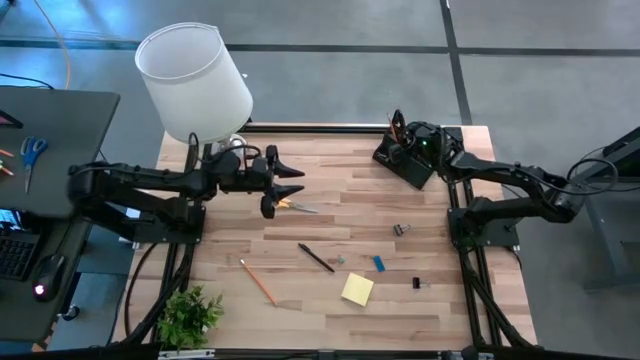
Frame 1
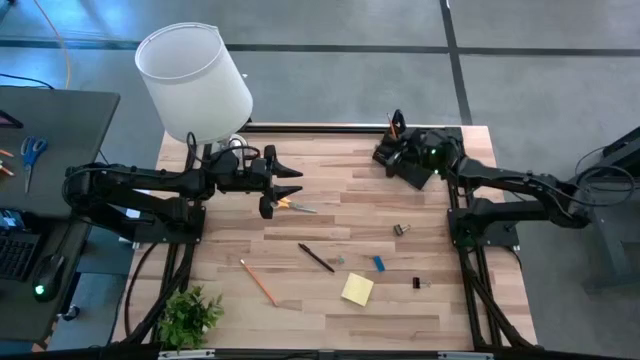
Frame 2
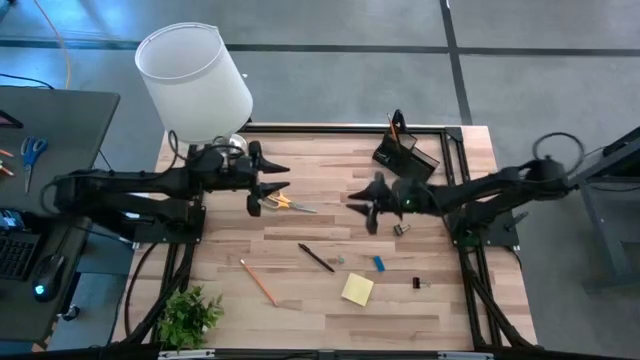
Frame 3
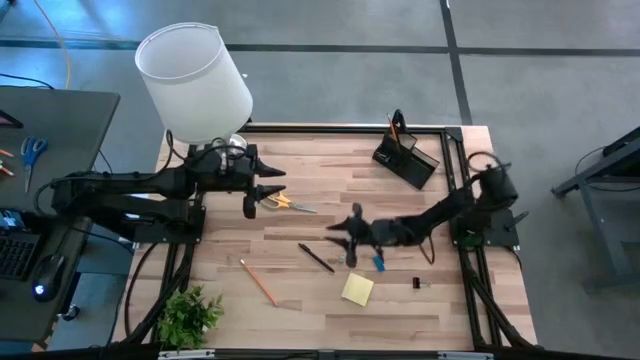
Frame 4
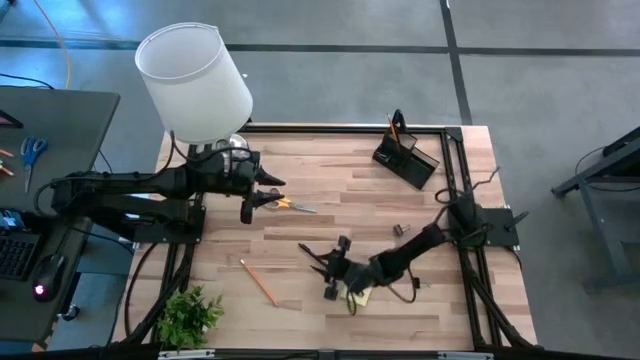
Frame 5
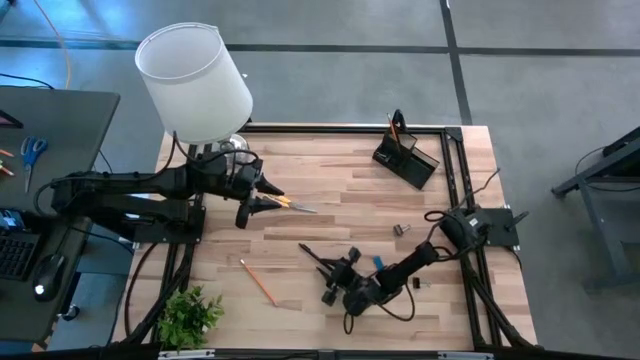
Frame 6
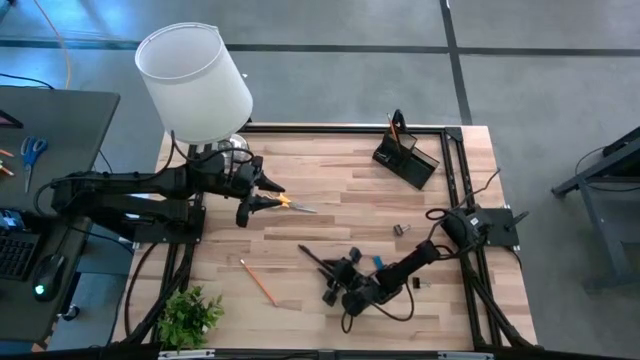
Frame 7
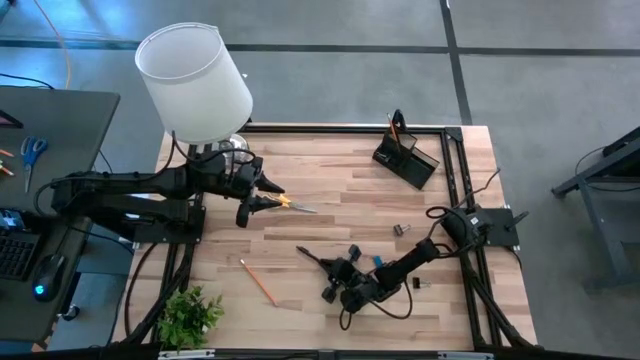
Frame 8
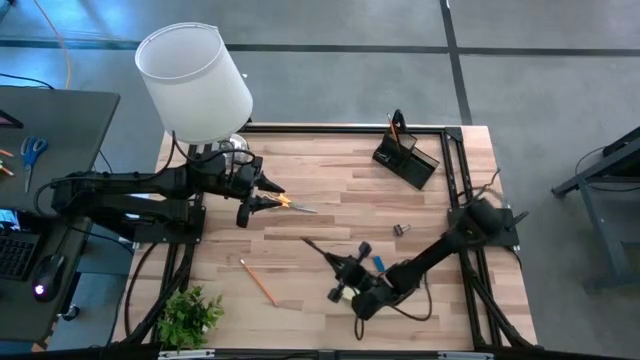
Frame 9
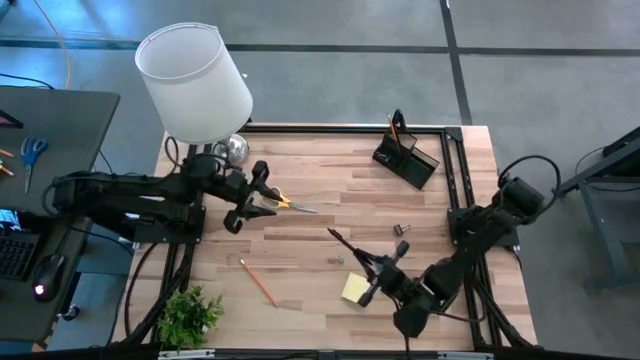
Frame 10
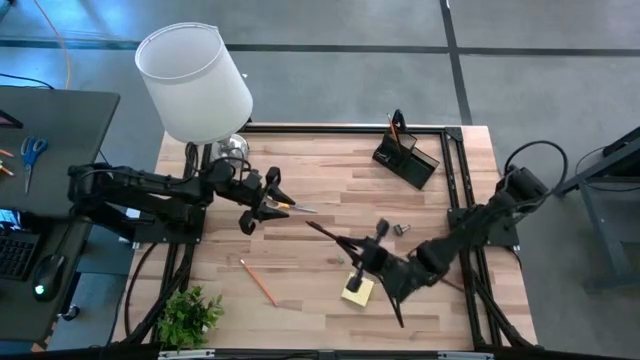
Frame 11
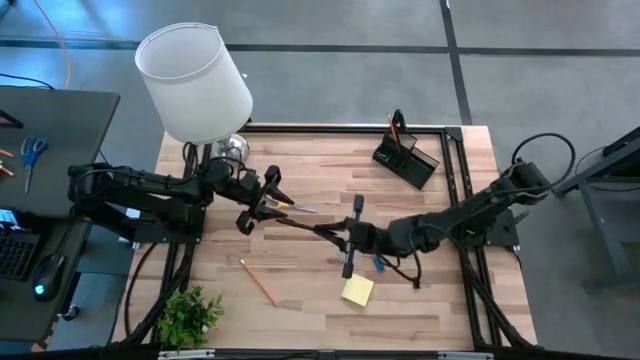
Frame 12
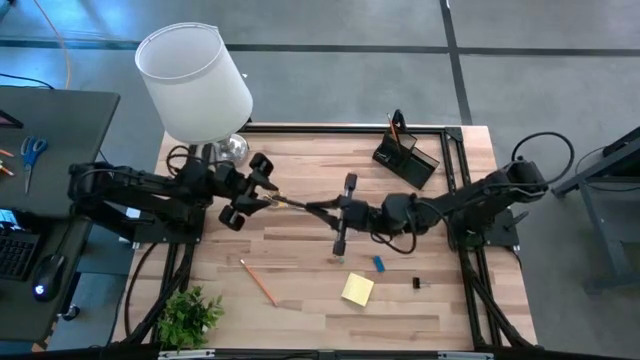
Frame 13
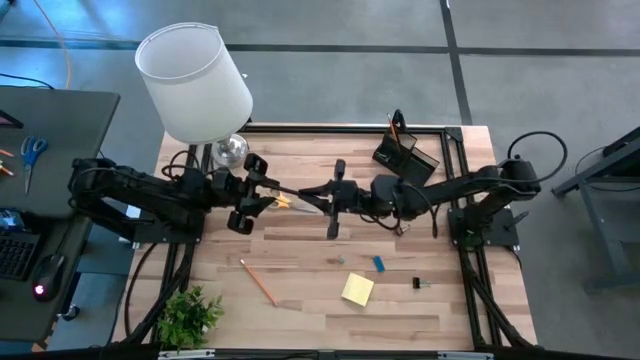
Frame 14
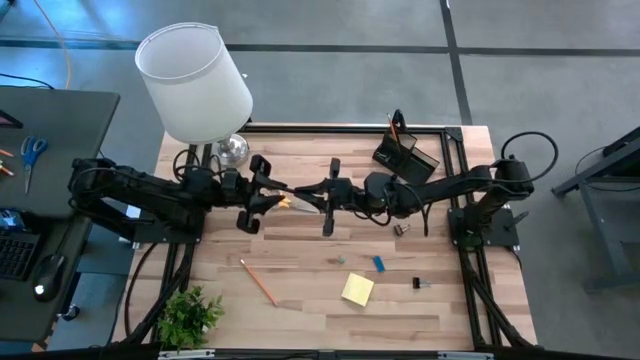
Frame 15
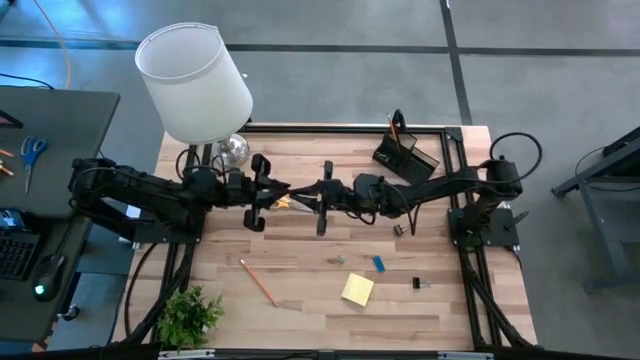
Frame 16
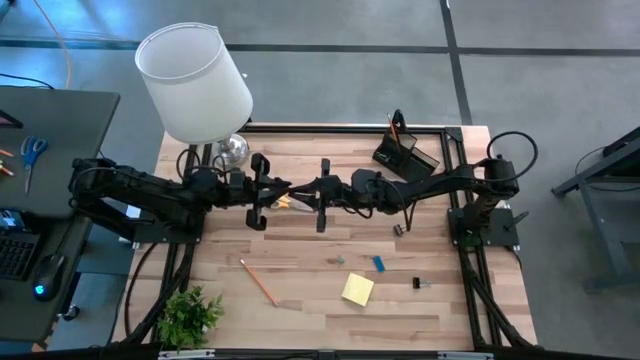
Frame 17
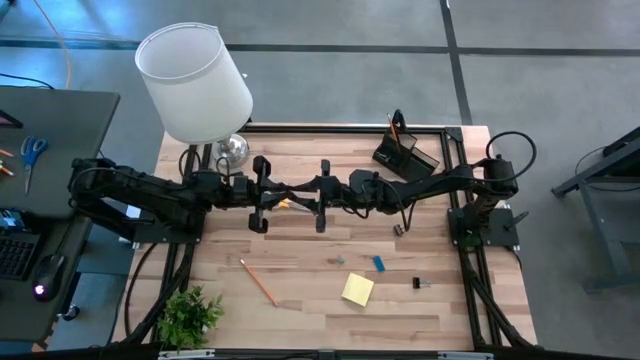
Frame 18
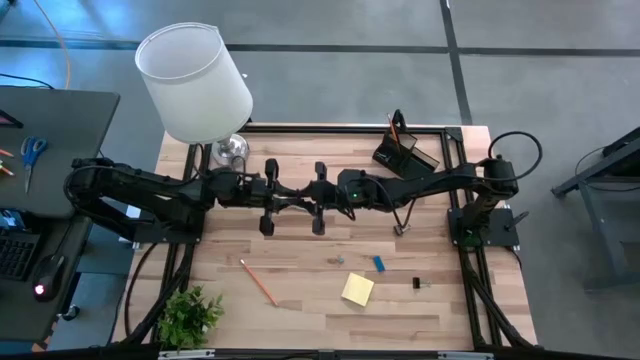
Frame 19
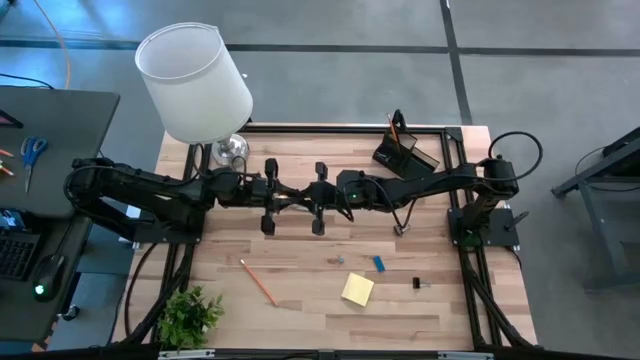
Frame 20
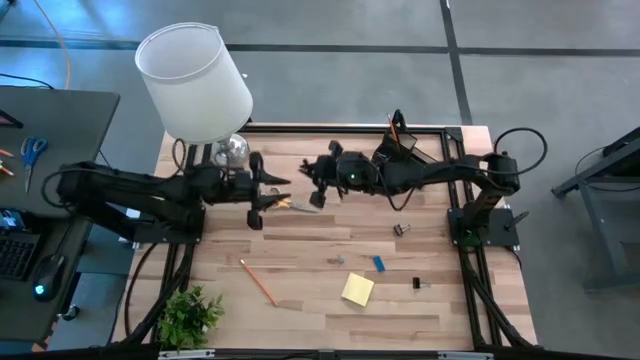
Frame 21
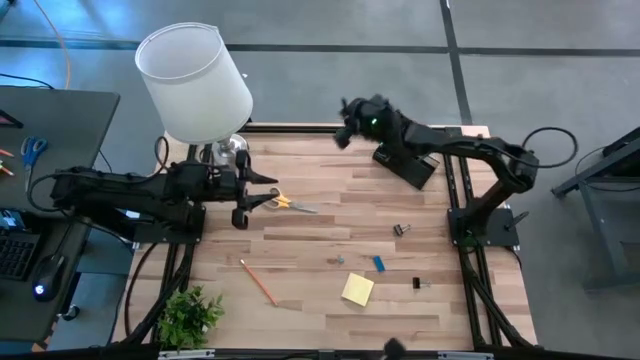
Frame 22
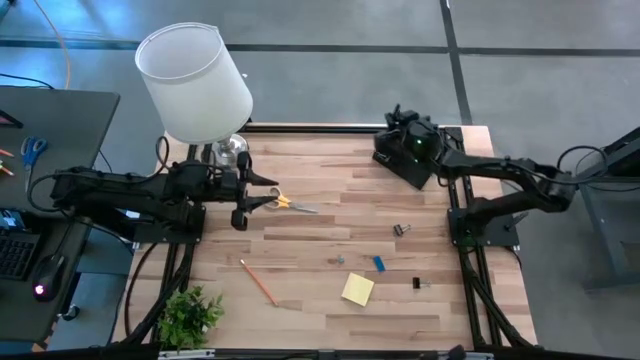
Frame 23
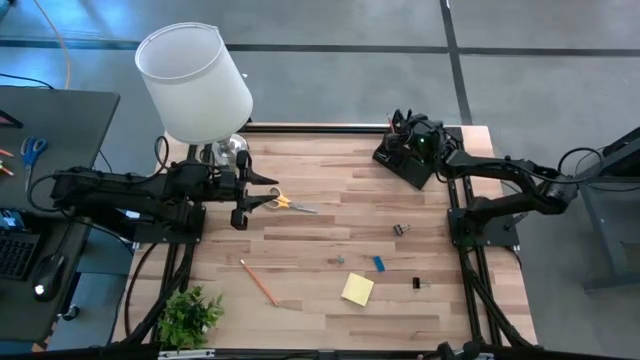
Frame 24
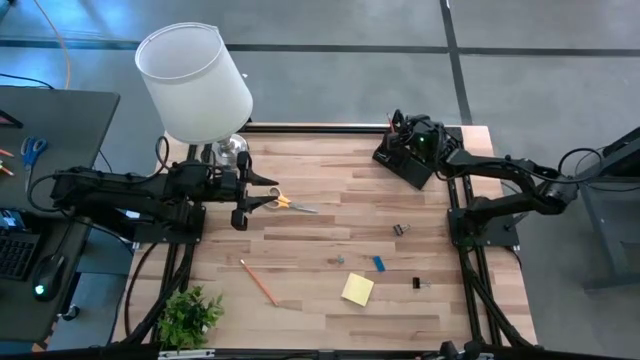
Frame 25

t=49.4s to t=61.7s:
Task: Pick and place office supplies into organizer
Put the black pen into the mesh desk organizer

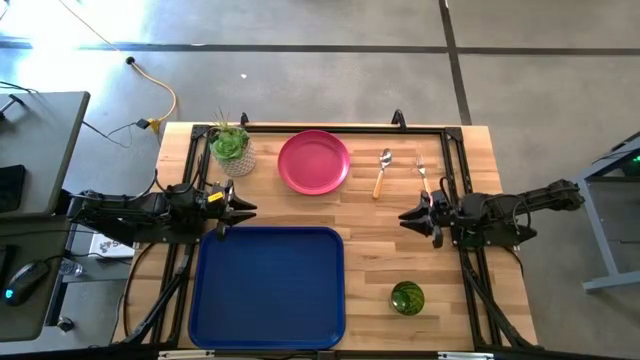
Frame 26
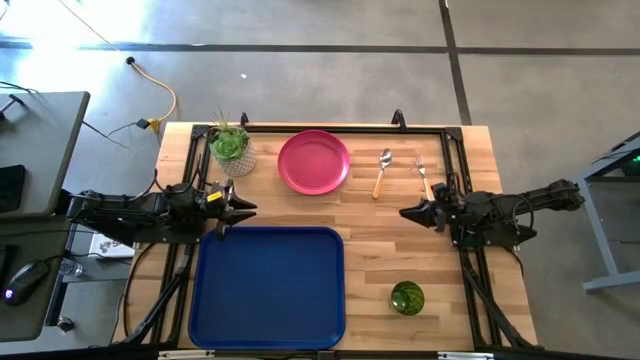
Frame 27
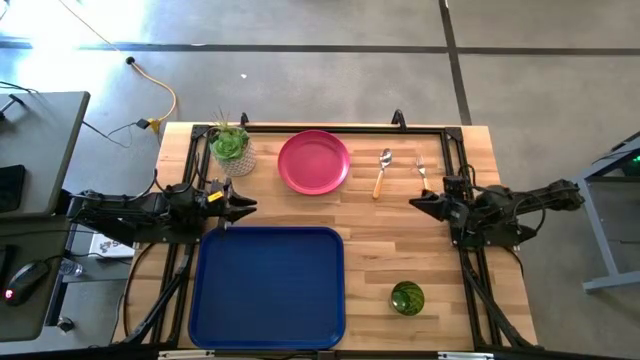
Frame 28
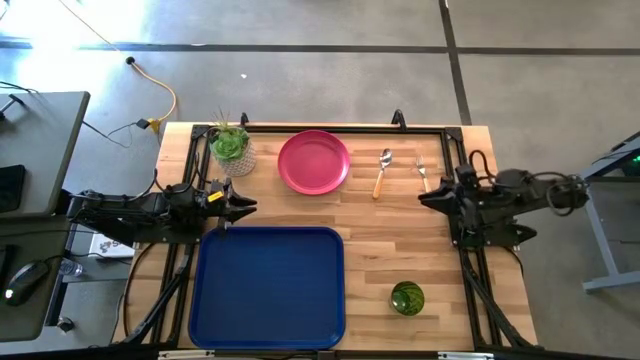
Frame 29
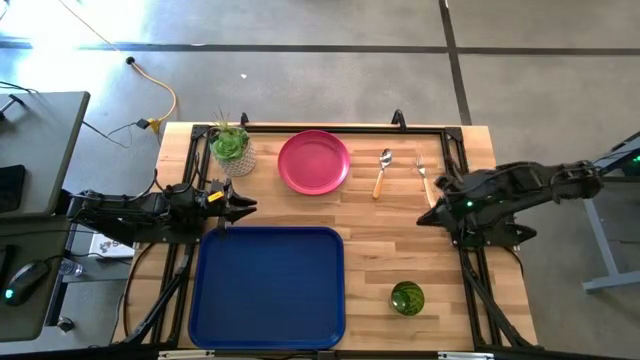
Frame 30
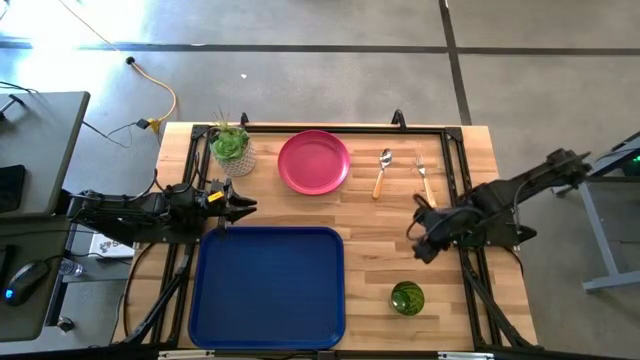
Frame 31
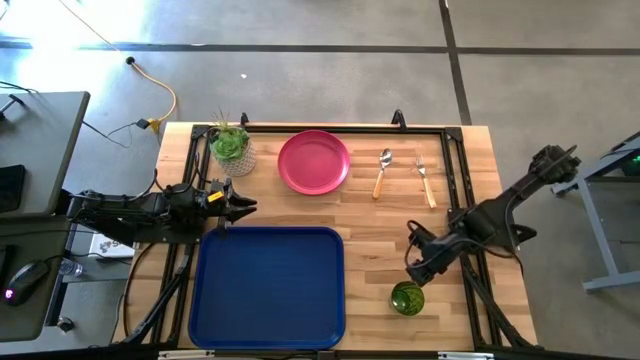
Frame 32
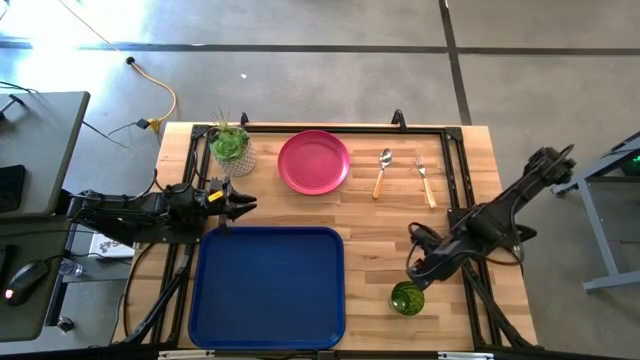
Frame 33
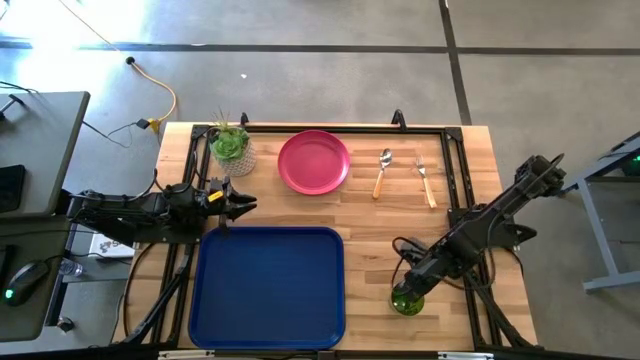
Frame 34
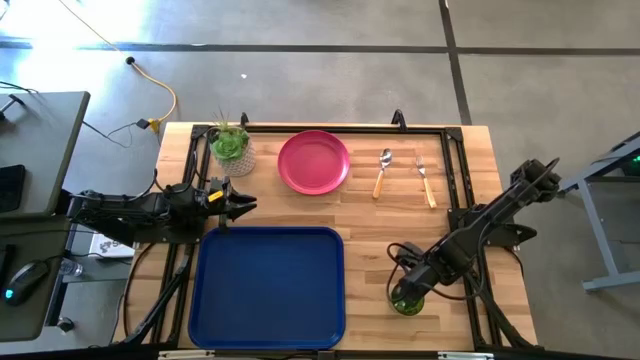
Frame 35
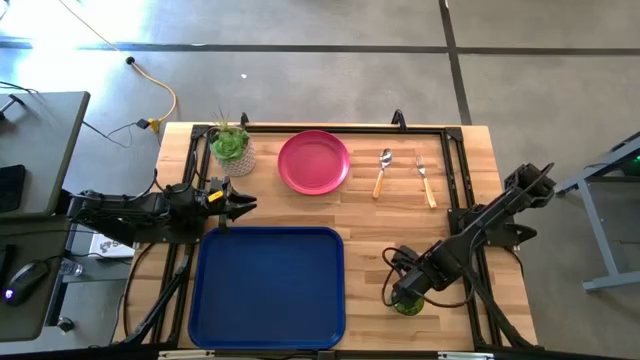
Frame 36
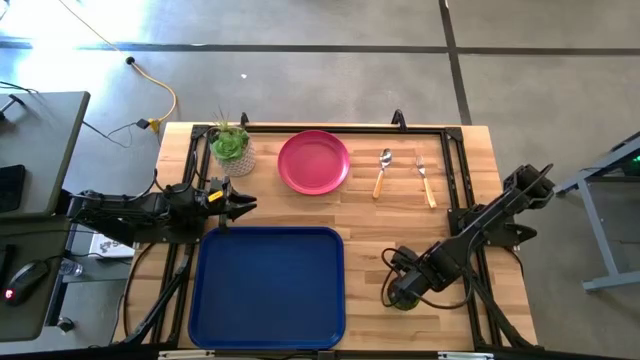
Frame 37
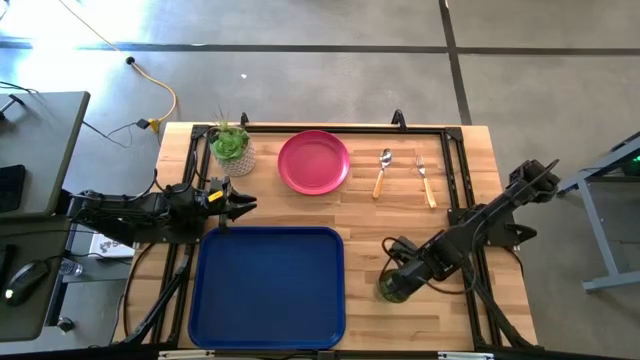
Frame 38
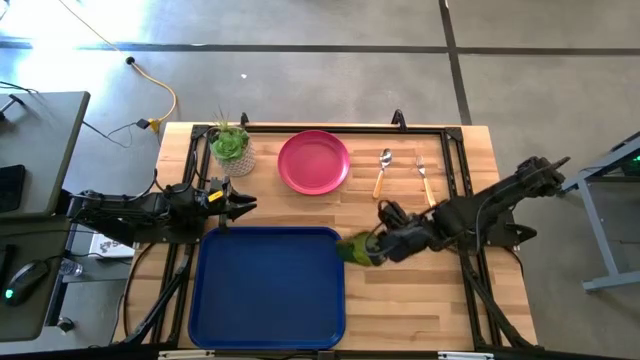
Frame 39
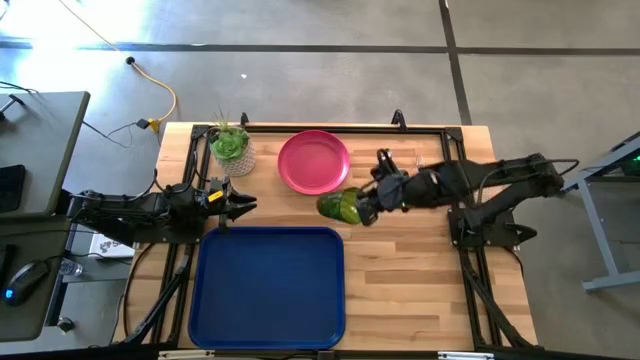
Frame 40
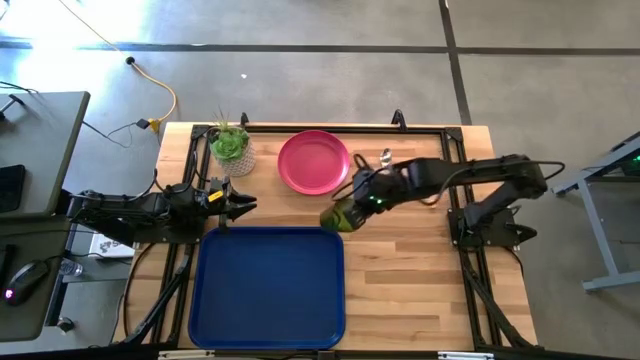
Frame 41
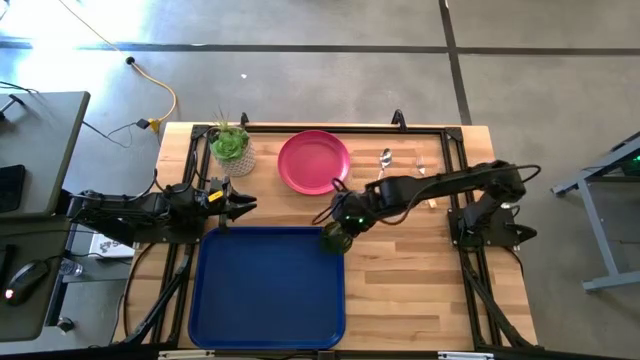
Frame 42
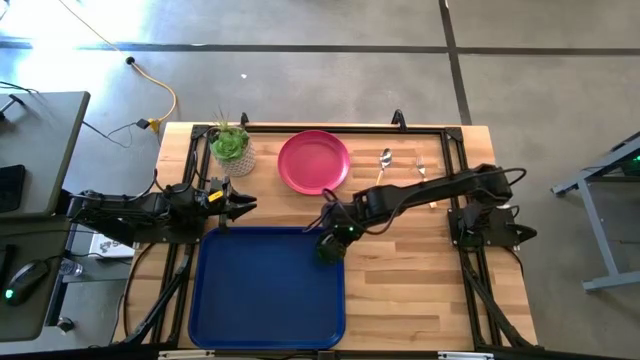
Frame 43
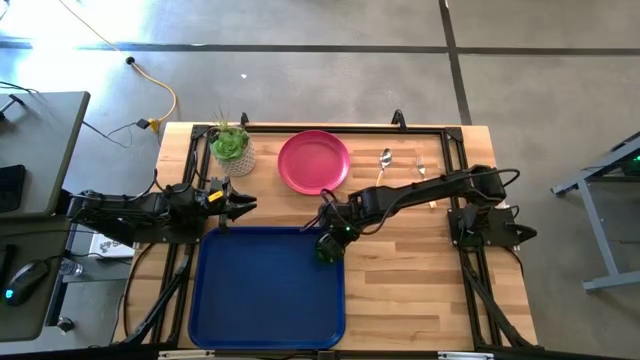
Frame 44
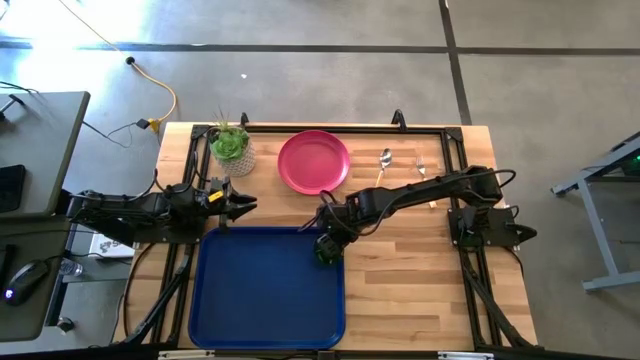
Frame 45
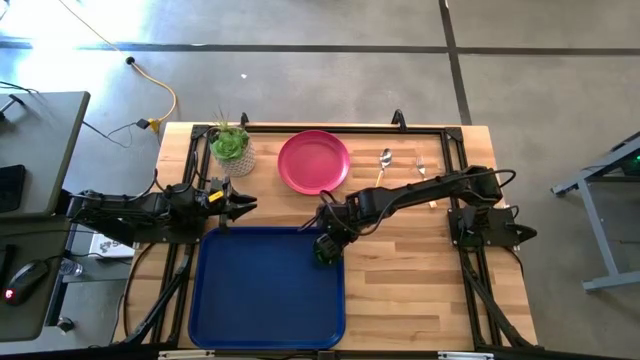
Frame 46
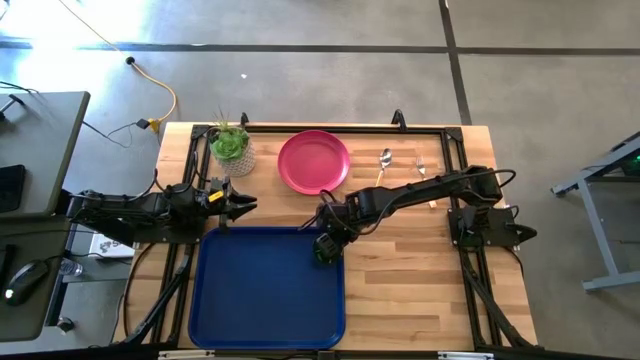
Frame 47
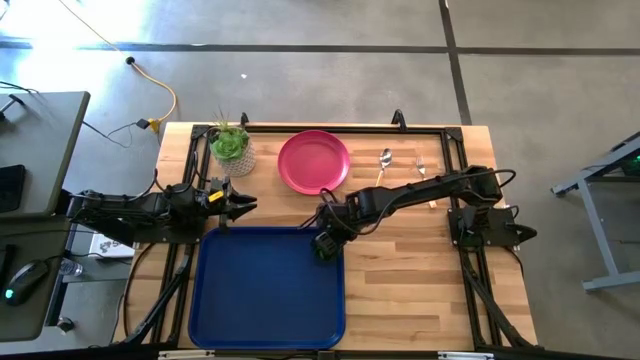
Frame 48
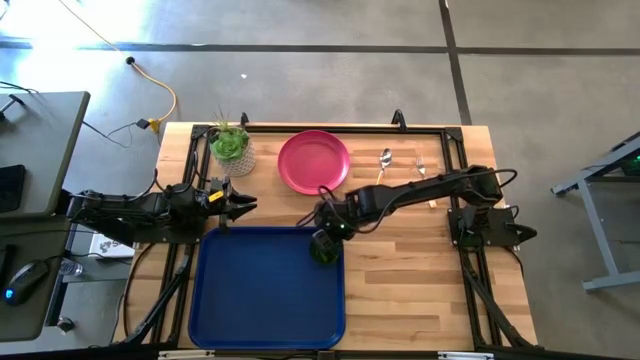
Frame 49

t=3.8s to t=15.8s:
Task: Pick and place plate/cup/fork/spoon on tray
Put the green cup on the top right of the blue tray
